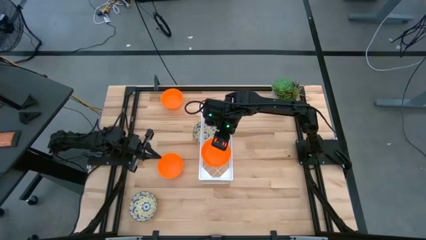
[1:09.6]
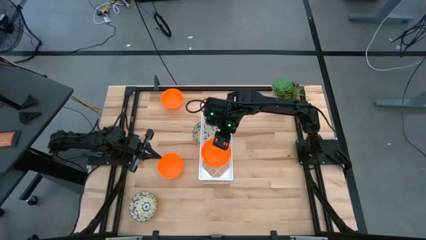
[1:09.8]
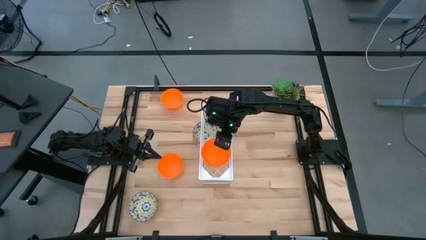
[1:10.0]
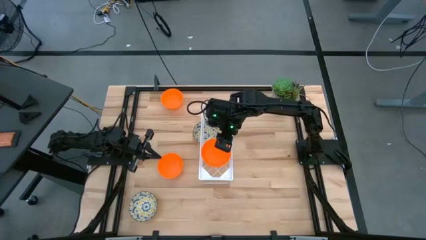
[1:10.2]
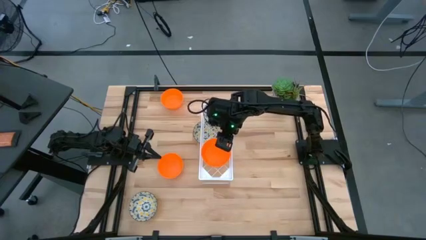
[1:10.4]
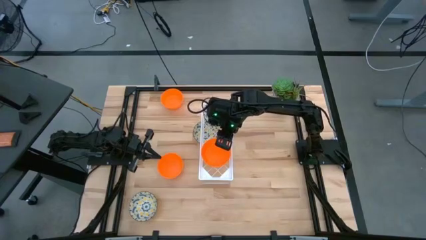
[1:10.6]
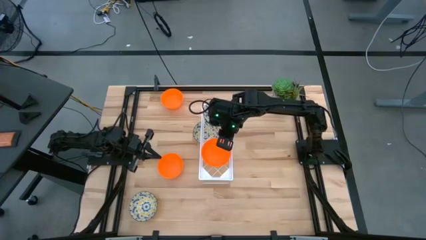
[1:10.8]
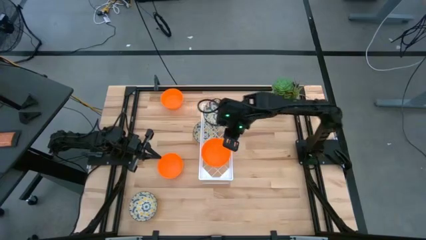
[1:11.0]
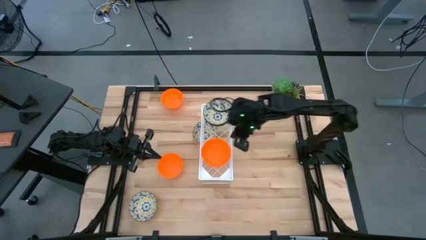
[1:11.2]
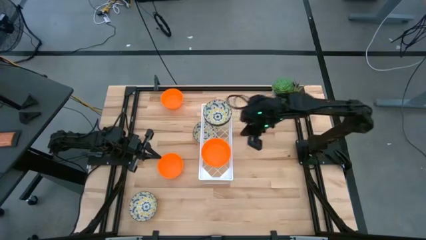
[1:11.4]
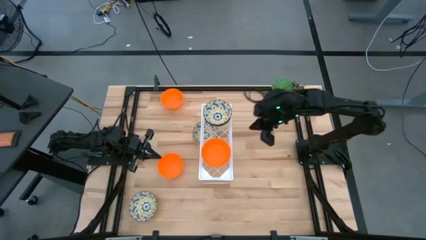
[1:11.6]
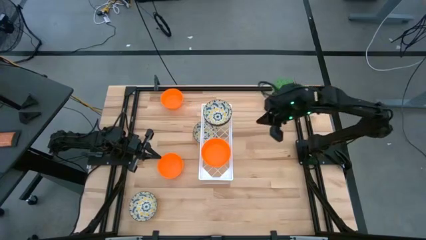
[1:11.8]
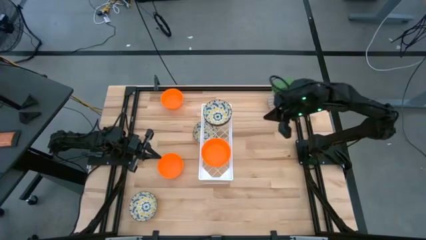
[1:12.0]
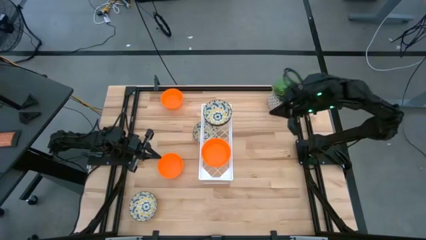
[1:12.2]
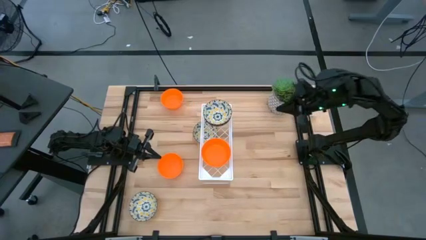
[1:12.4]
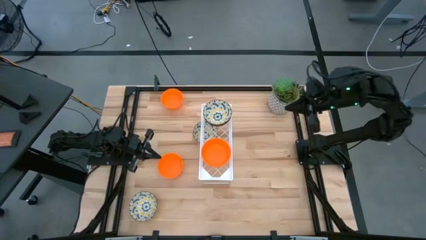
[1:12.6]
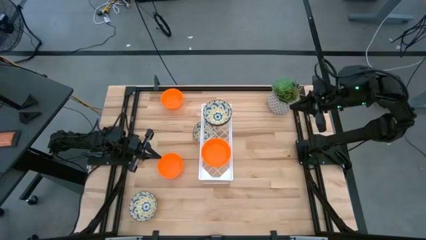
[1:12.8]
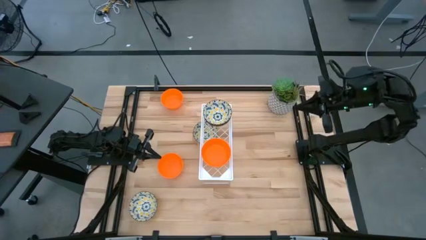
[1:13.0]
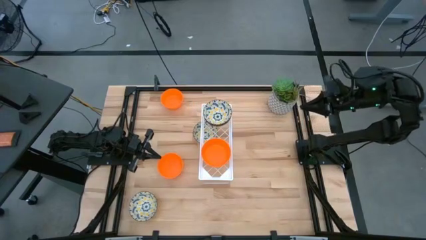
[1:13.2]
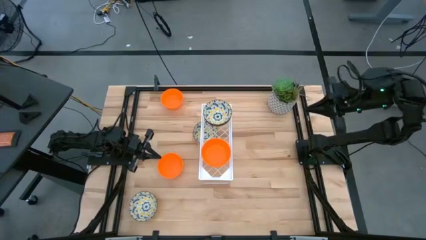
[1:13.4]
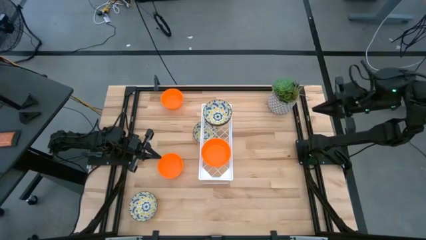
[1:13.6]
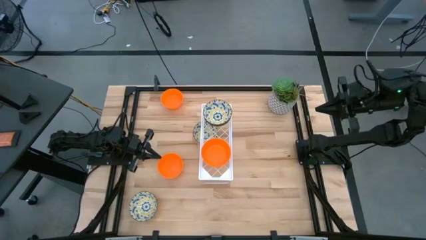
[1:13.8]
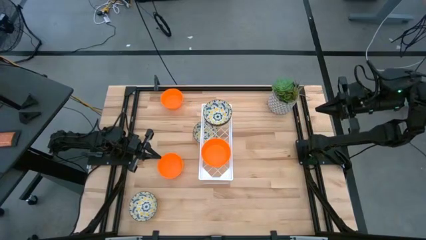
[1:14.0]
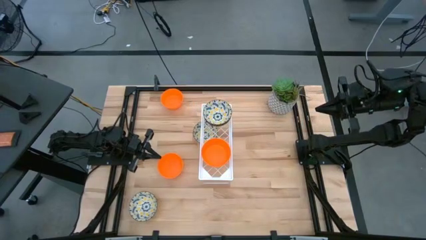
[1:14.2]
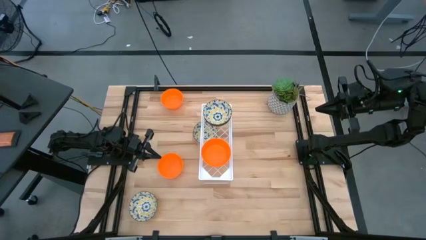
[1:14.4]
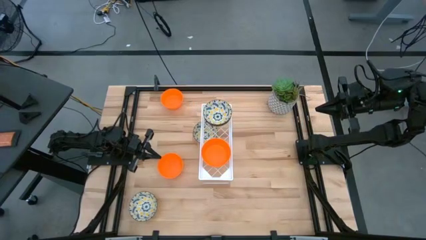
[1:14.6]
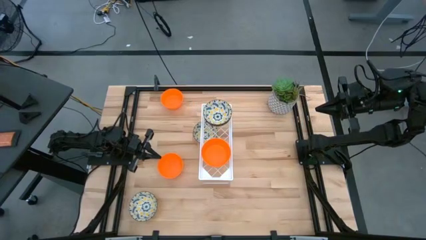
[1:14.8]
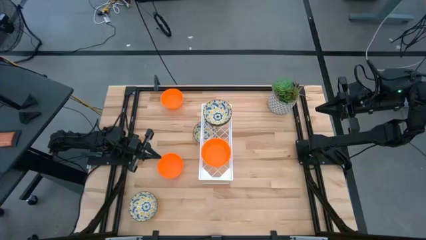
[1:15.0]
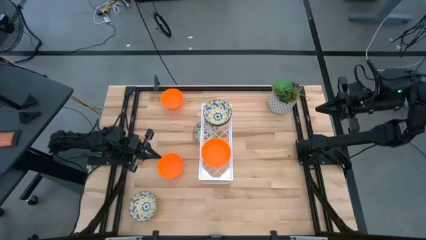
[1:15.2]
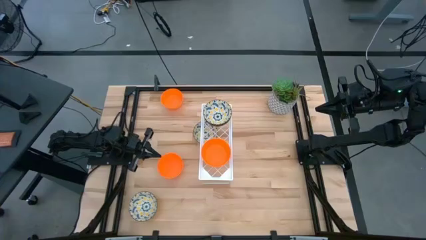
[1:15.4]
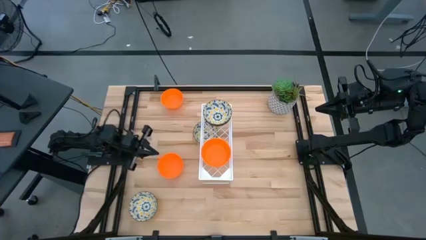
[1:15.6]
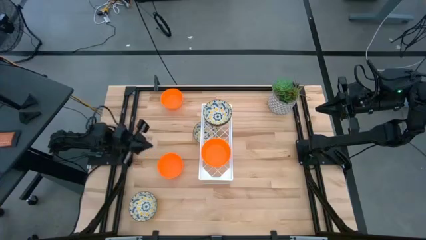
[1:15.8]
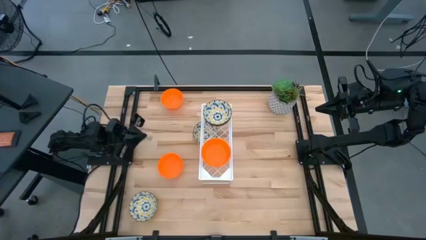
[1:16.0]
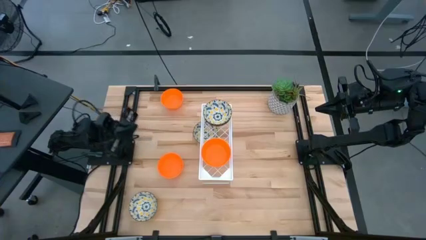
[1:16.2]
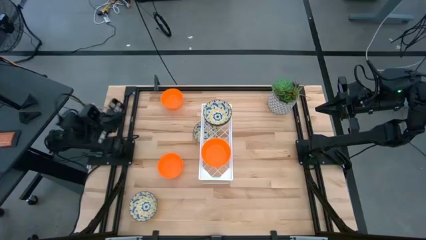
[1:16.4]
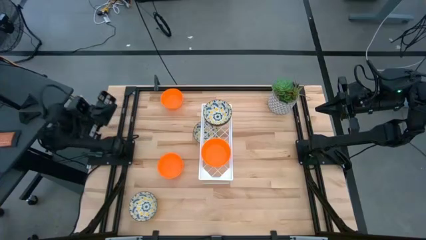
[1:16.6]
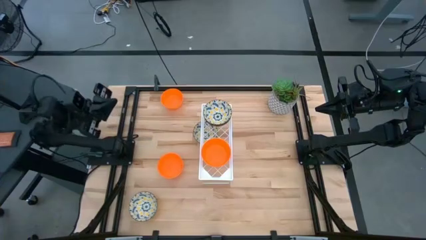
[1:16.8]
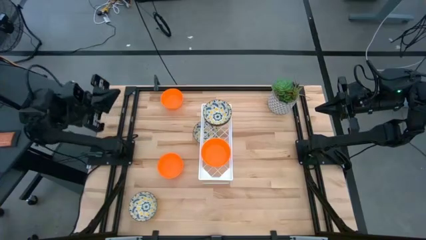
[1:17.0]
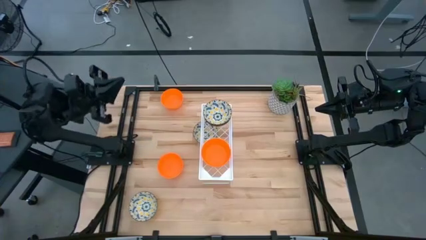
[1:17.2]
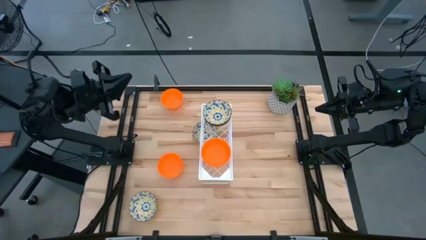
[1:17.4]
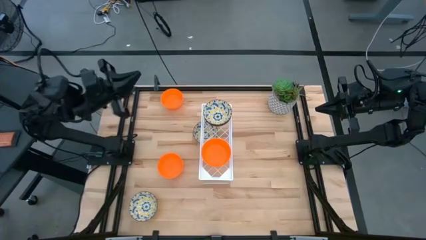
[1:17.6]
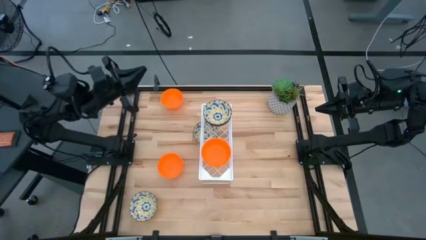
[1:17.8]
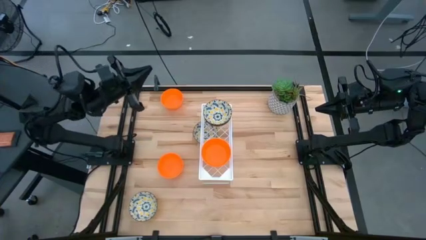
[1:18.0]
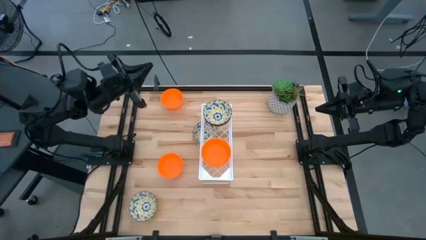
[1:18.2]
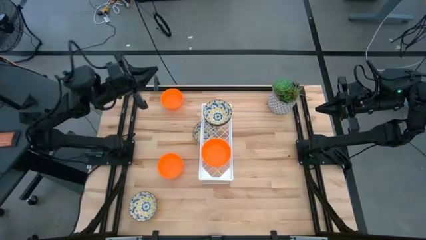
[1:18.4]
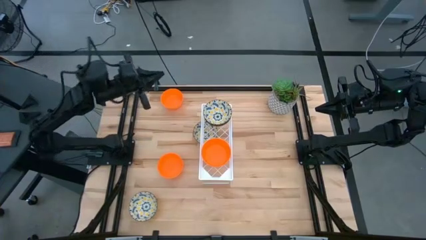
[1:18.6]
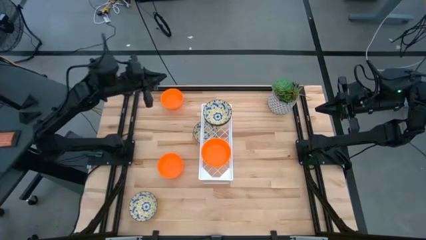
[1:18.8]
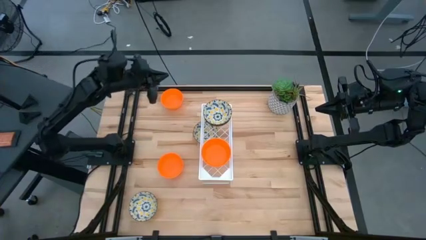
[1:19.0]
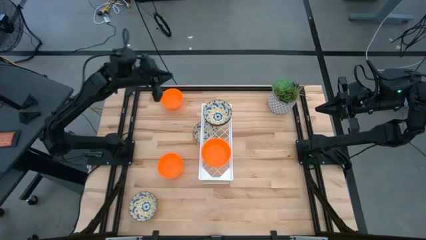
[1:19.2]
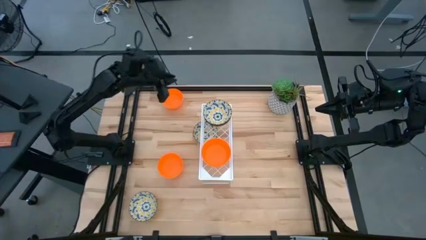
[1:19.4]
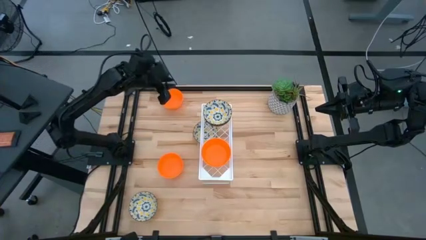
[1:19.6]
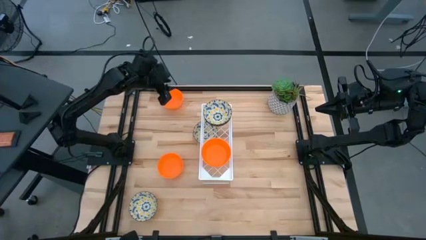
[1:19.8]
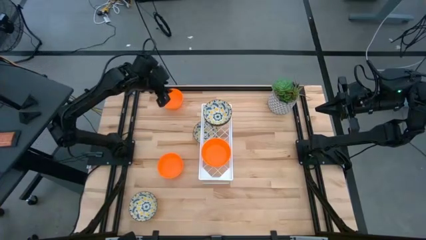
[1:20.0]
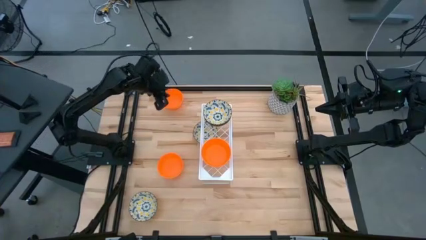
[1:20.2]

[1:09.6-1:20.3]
Task: Pick & Place Mini bowls
Stack the orange bowl on top of the orange bowls on the shelf

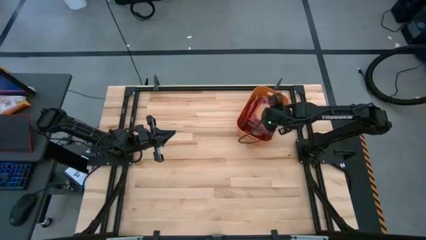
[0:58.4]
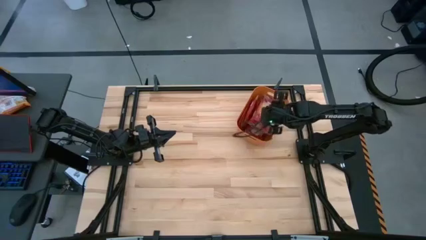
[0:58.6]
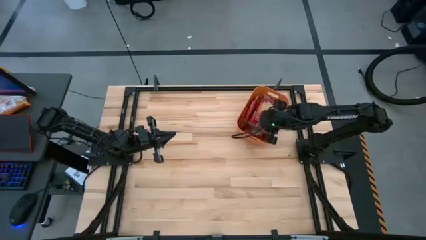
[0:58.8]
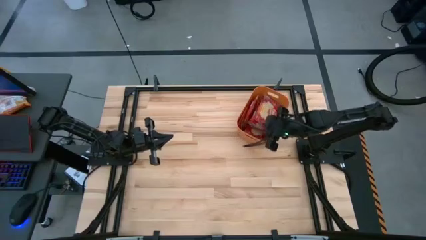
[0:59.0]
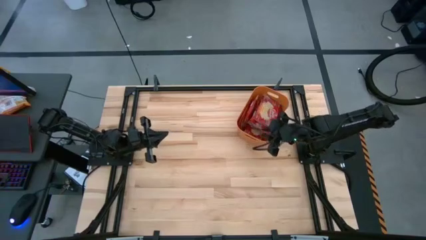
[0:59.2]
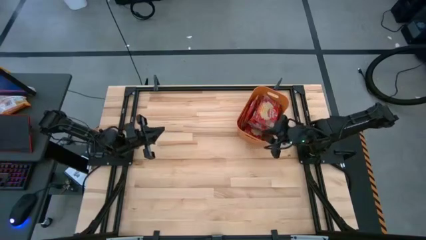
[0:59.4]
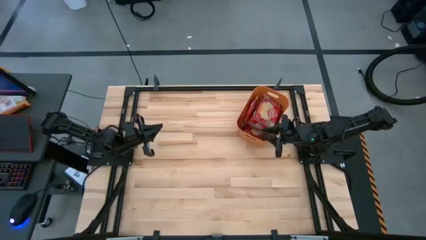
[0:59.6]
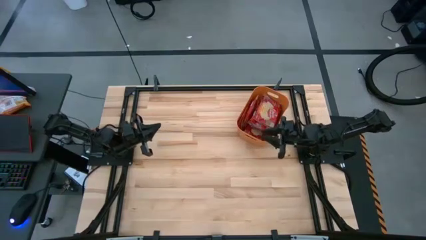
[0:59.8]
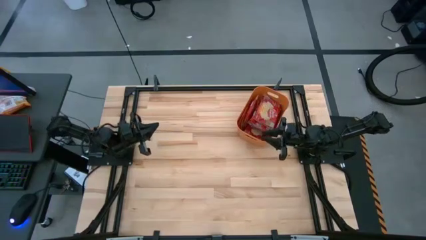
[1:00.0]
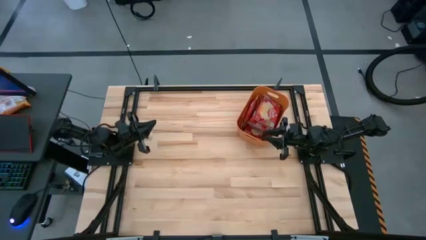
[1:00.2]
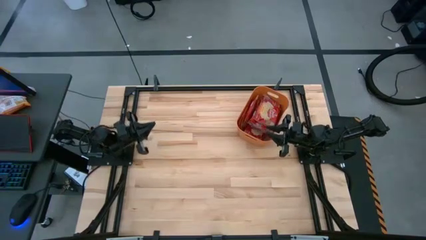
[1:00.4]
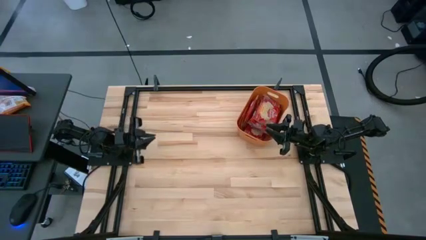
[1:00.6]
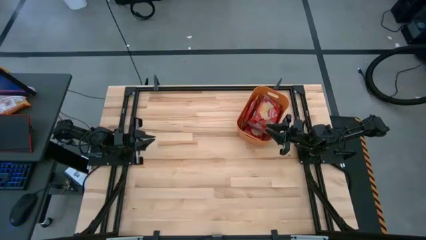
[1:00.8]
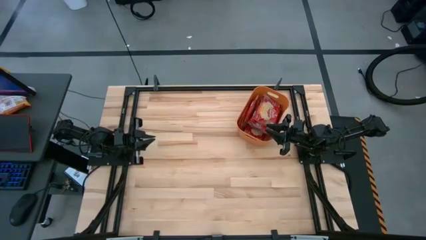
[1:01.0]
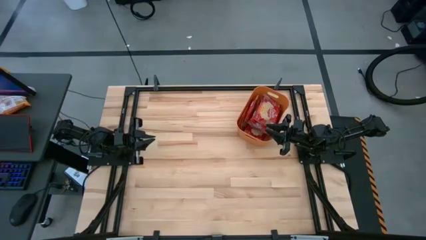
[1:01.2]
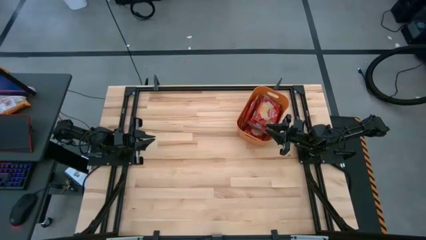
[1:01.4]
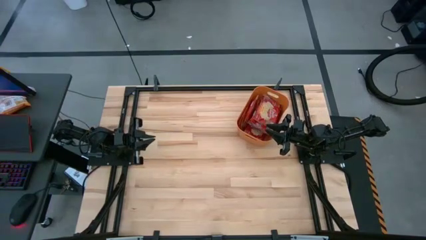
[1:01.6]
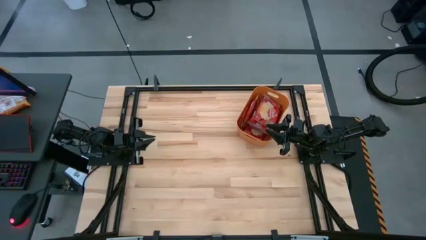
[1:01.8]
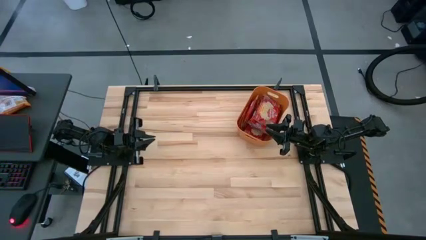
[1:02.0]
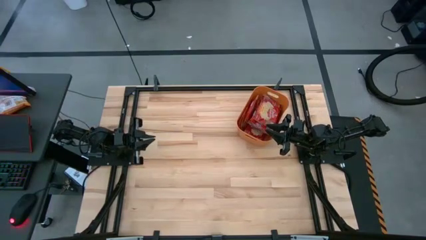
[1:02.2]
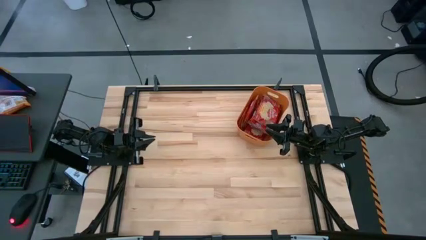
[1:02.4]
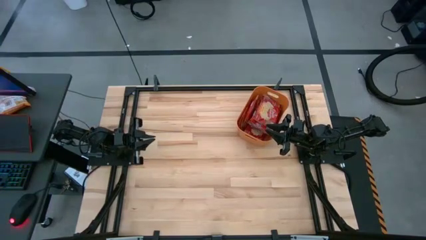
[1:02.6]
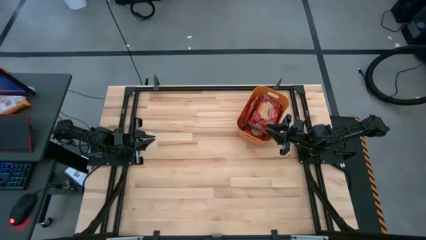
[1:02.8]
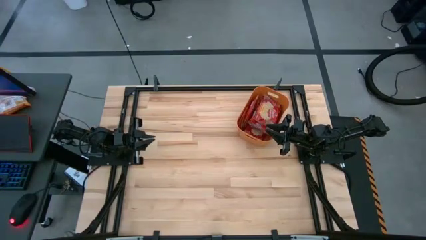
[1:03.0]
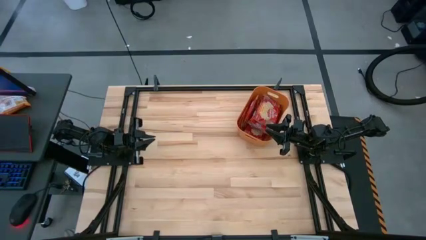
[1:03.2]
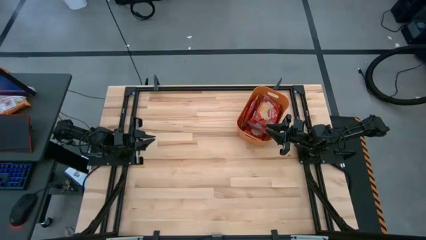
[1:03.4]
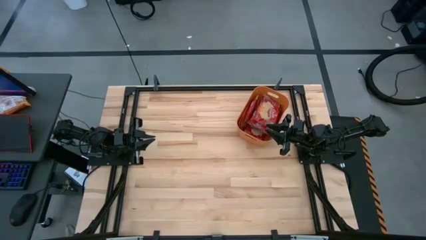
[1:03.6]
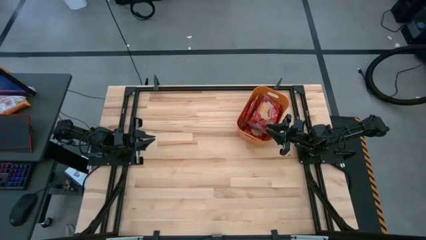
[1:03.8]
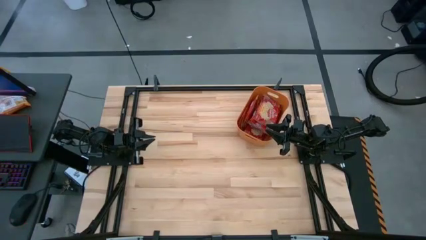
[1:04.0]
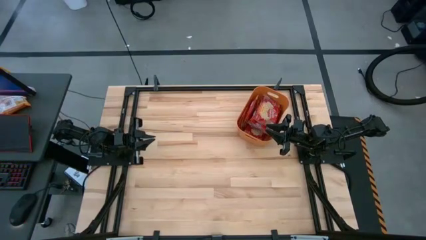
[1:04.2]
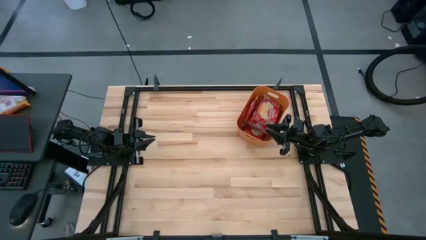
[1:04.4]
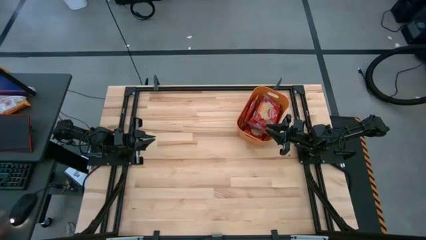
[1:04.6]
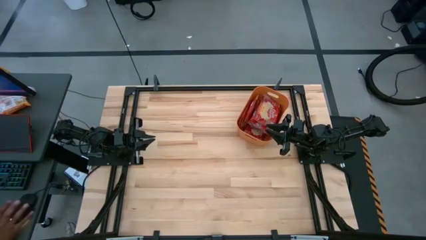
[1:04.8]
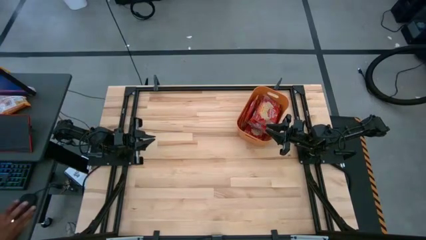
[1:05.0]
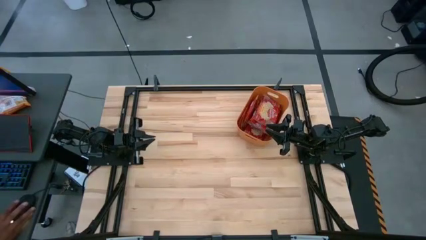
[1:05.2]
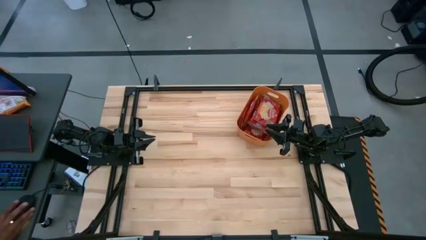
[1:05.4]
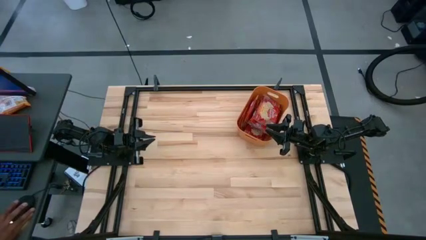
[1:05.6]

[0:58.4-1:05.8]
Task: Sort popcorn bags into baskets
Return to Home Position
